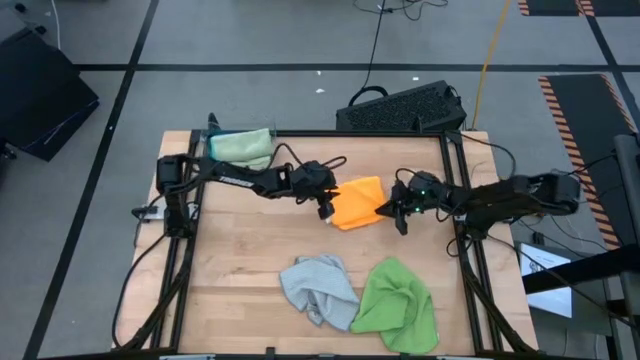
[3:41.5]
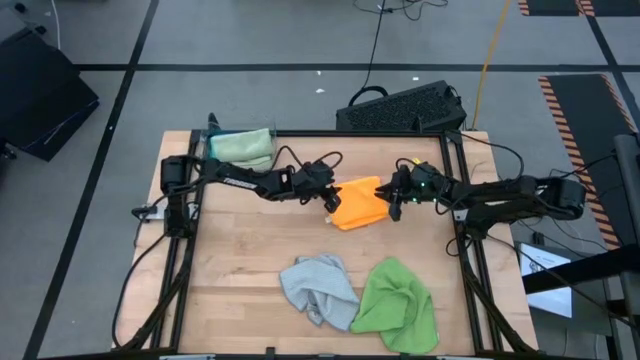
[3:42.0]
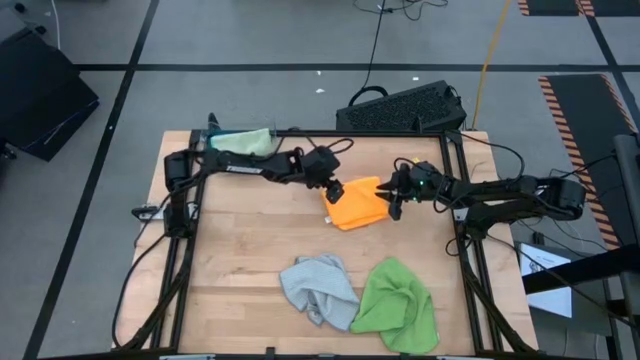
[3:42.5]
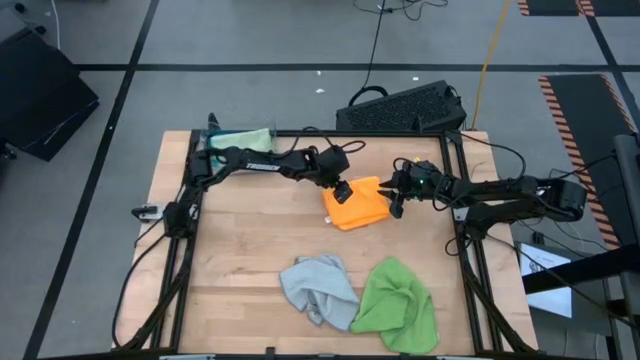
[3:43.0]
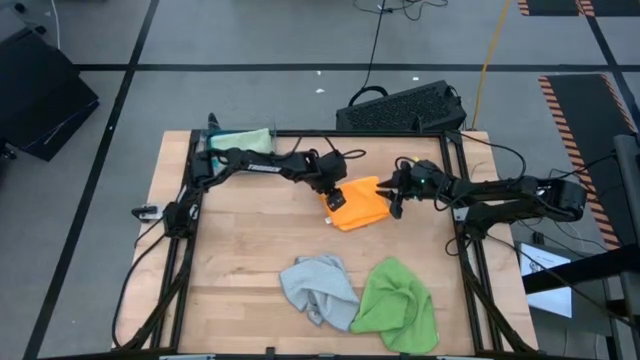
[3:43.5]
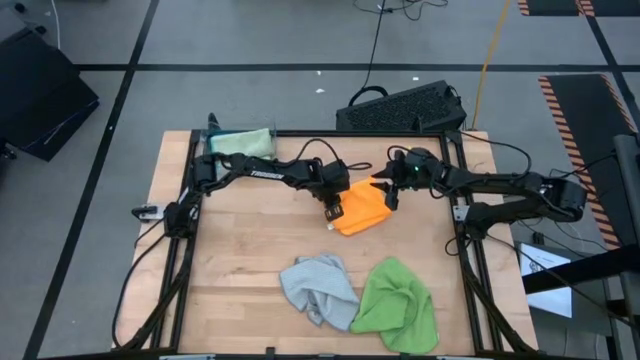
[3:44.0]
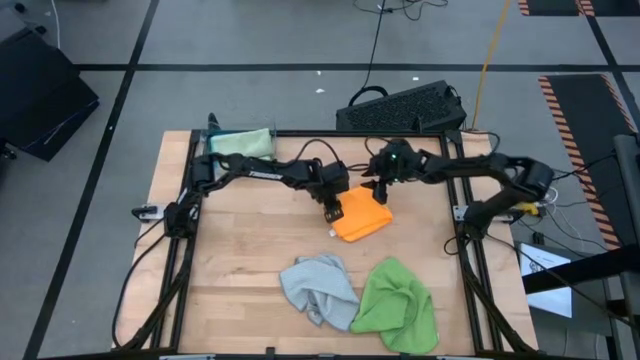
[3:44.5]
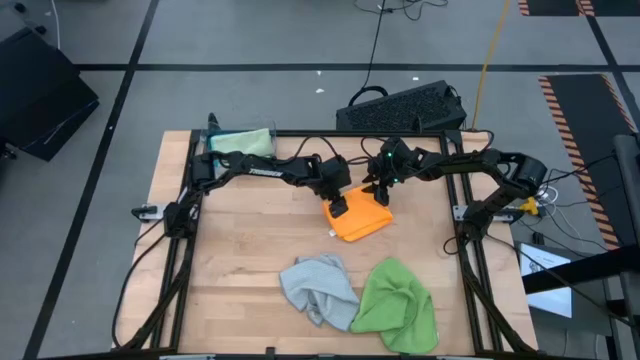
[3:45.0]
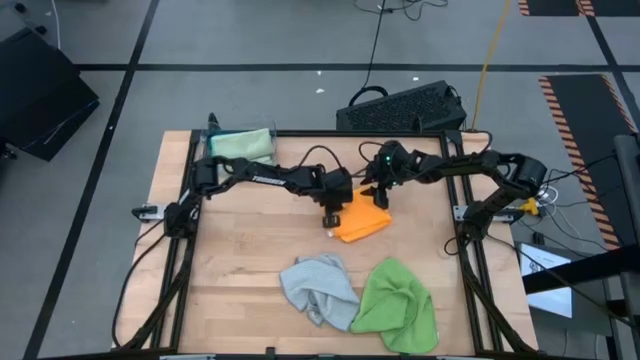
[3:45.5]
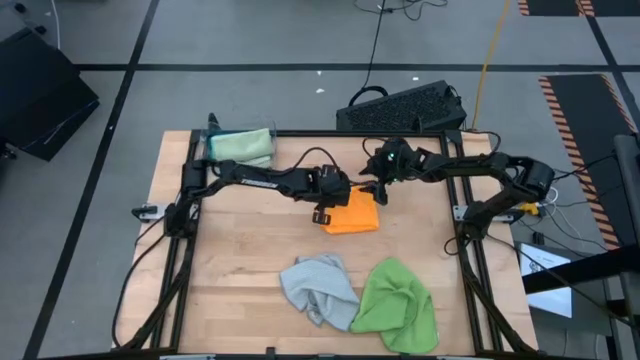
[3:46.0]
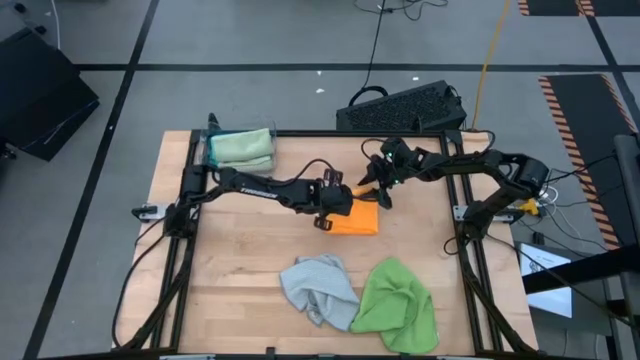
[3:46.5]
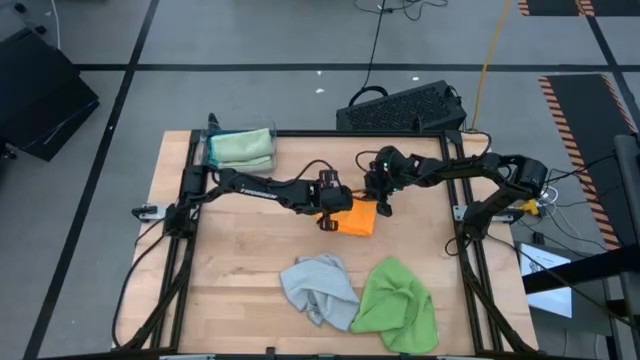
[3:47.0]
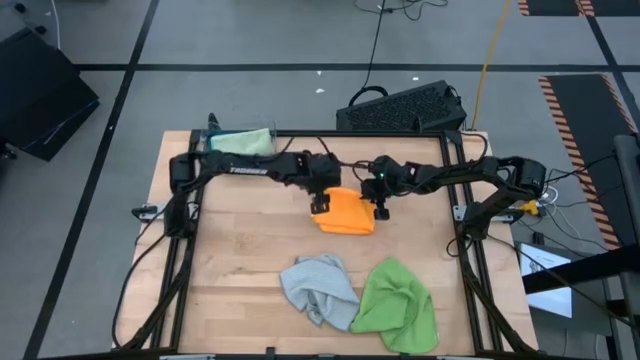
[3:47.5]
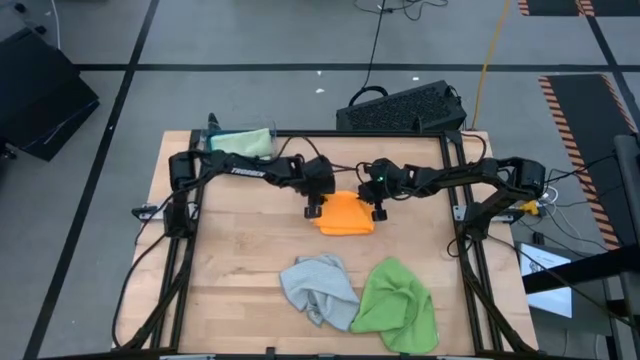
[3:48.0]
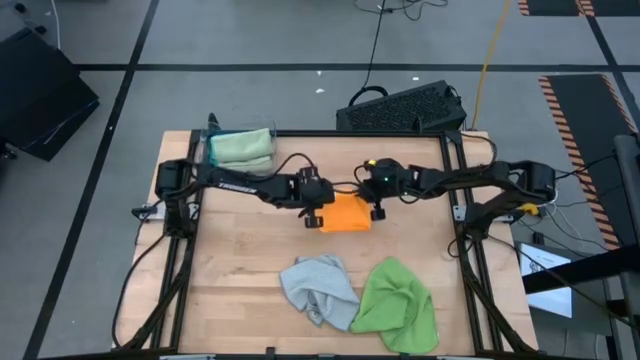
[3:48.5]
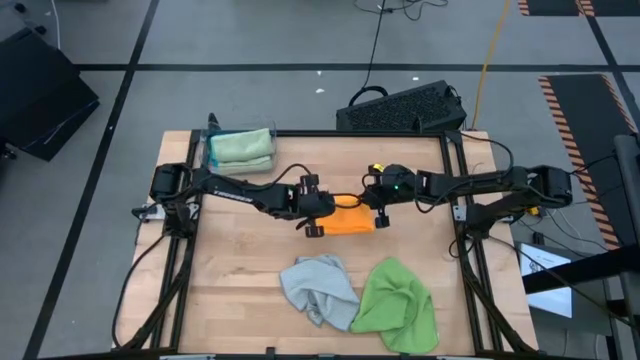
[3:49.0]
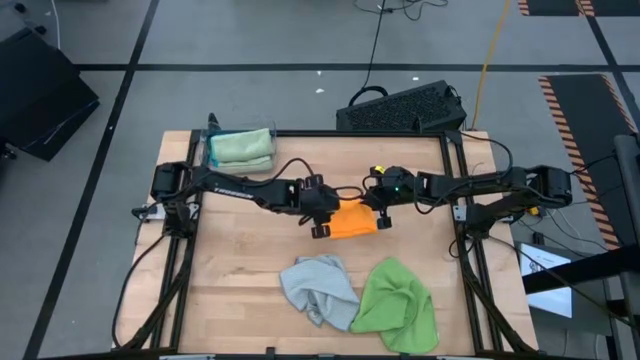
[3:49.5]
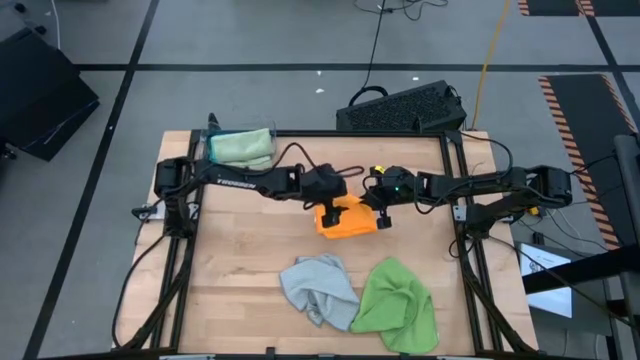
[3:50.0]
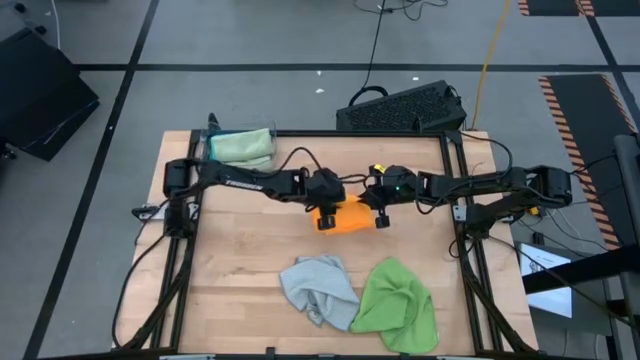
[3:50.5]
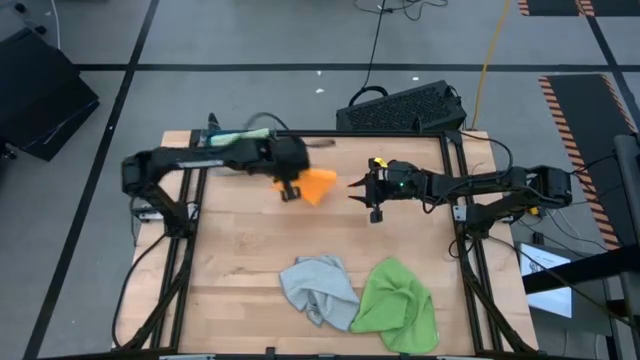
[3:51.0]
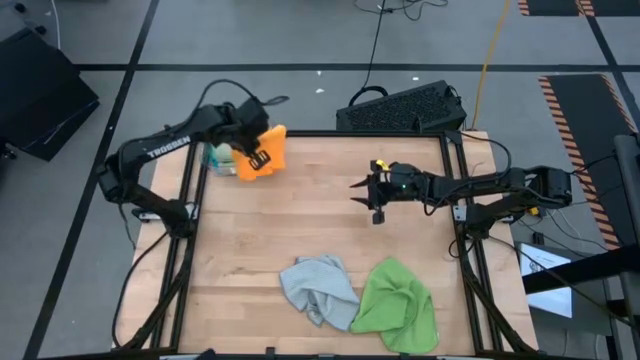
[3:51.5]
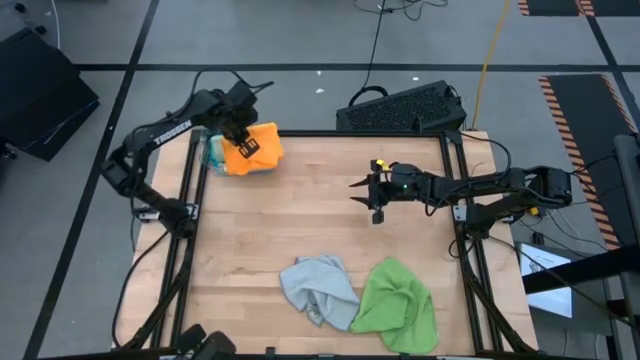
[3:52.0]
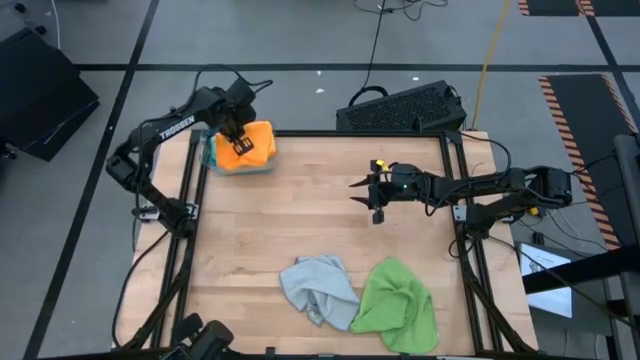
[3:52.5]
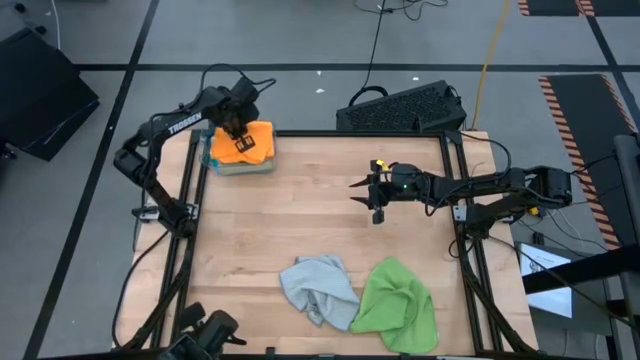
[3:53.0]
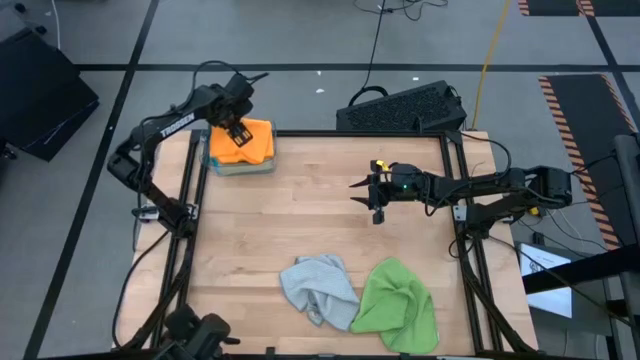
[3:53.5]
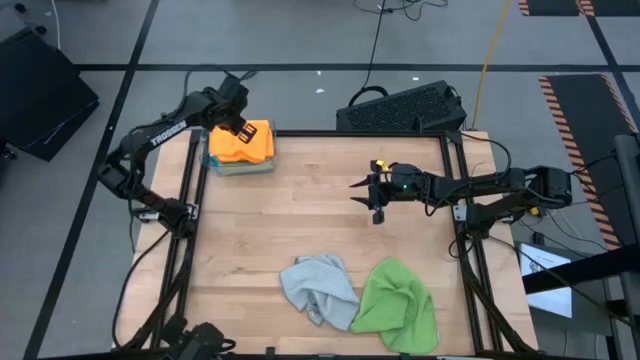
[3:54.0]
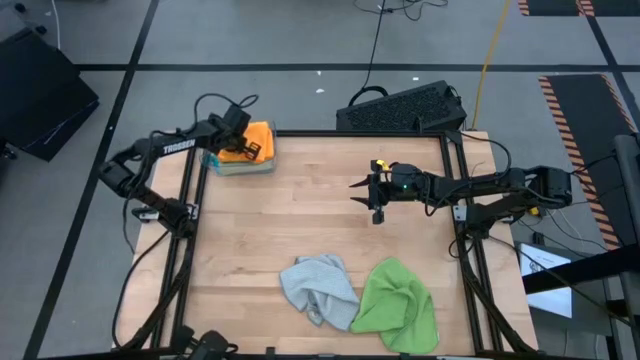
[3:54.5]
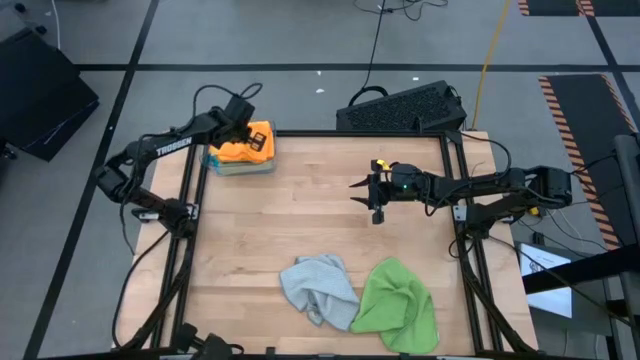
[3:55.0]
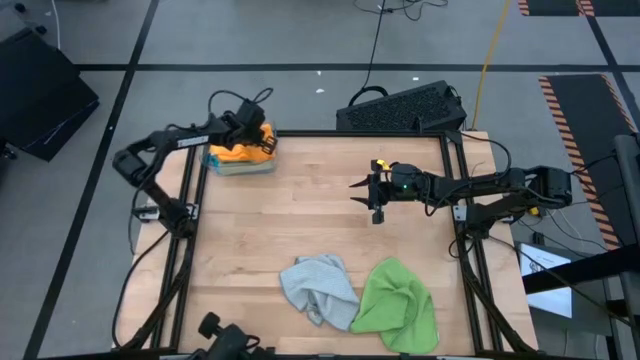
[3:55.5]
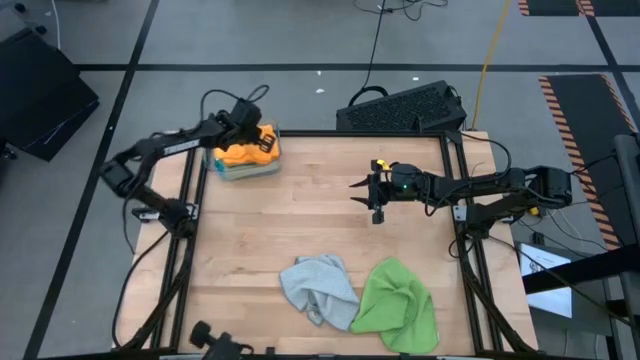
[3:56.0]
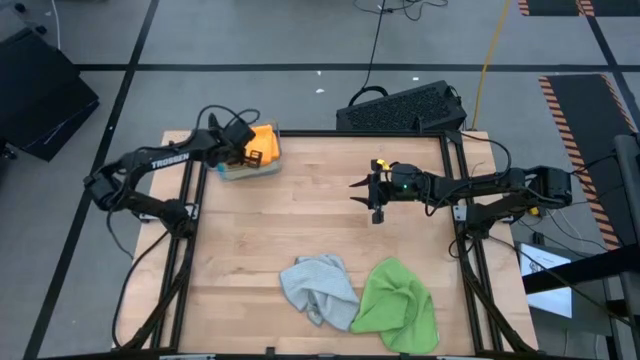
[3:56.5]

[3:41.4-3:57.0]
Task: Fold microfiber towels
Stack the orange microfiber cloth on top of the light green microfiber cloth

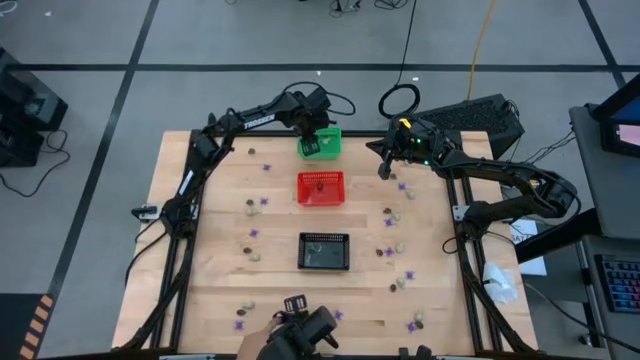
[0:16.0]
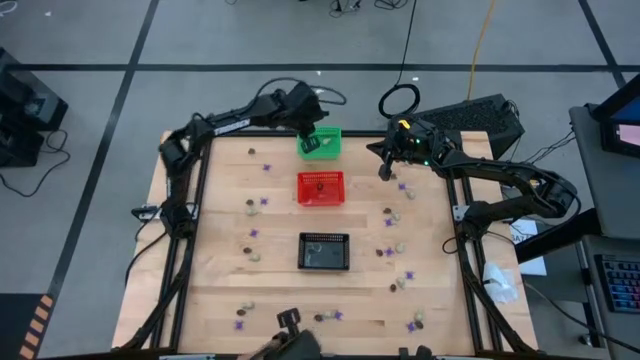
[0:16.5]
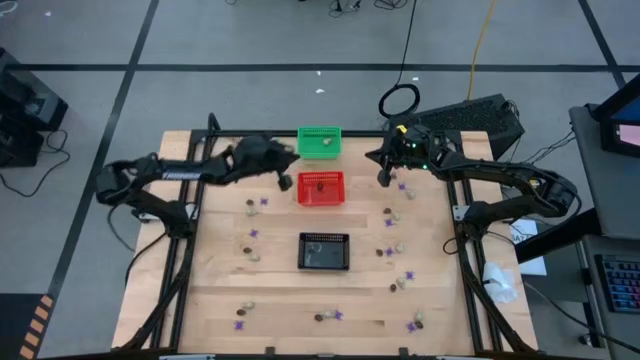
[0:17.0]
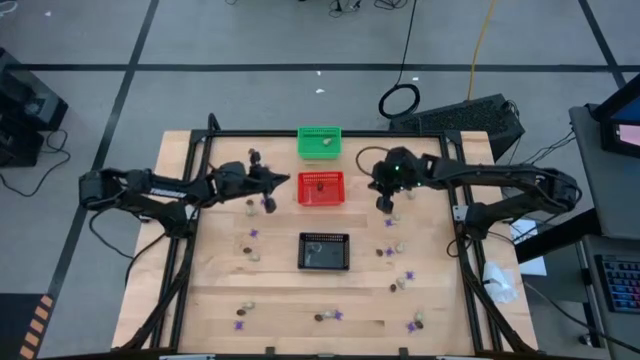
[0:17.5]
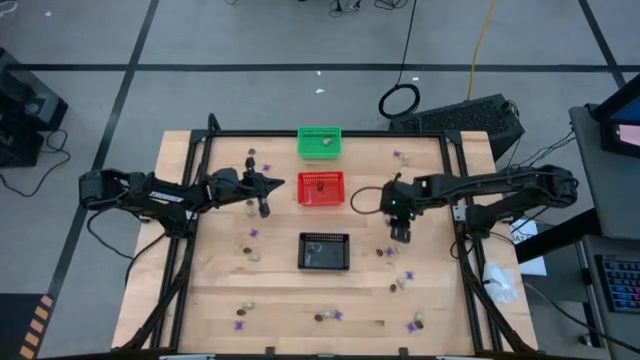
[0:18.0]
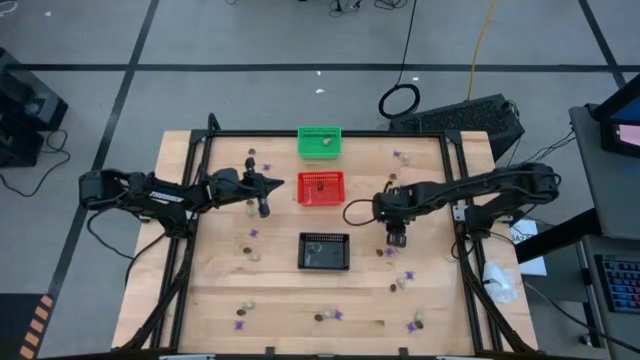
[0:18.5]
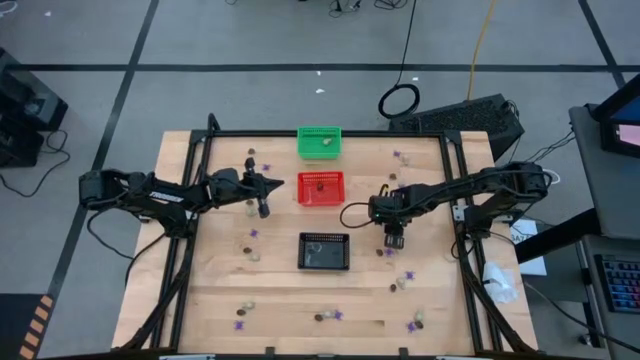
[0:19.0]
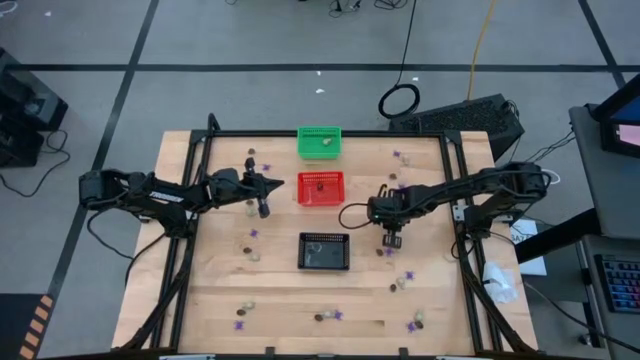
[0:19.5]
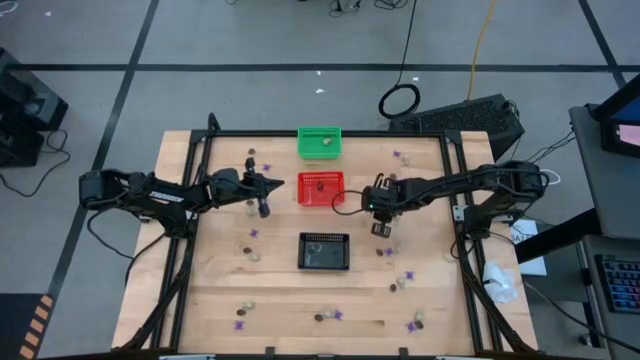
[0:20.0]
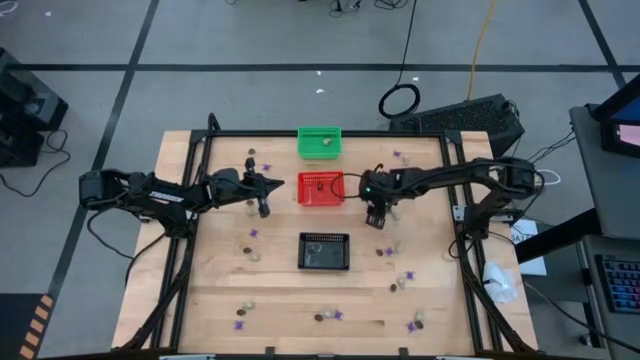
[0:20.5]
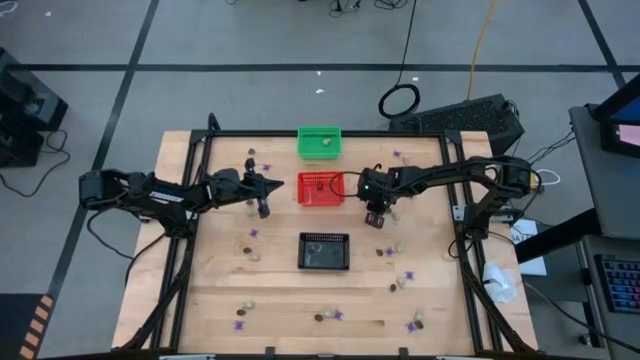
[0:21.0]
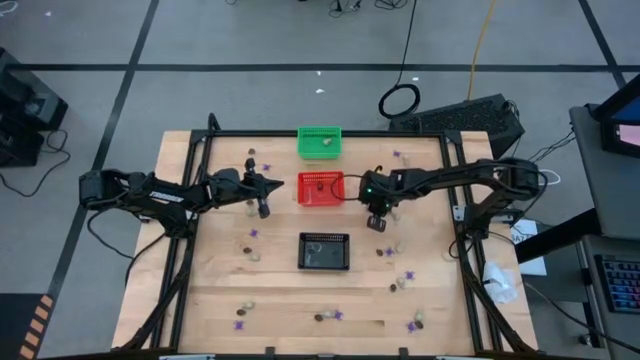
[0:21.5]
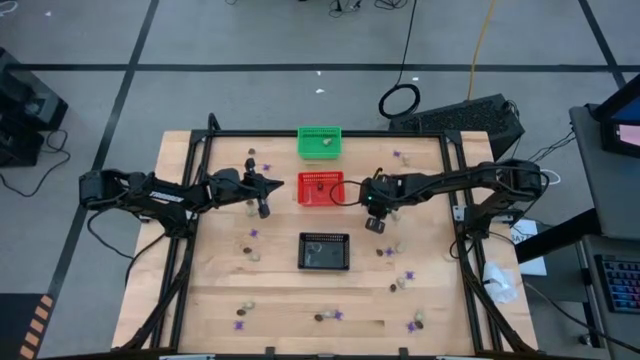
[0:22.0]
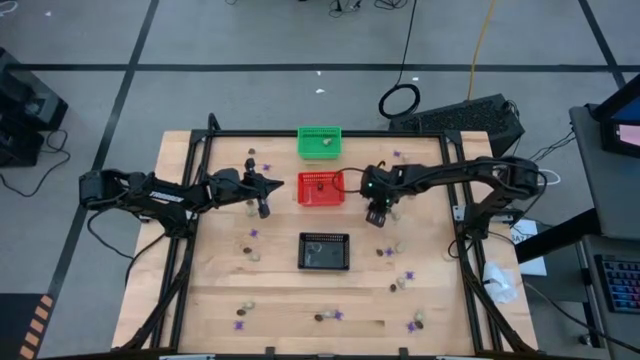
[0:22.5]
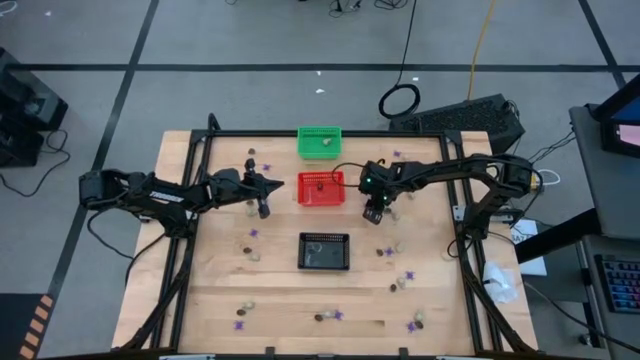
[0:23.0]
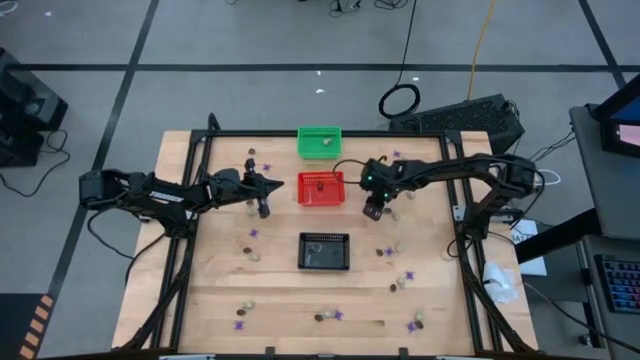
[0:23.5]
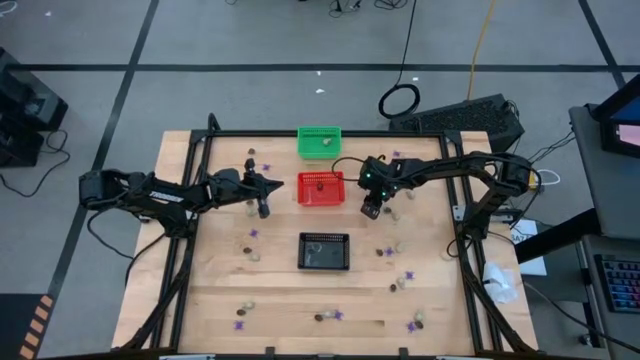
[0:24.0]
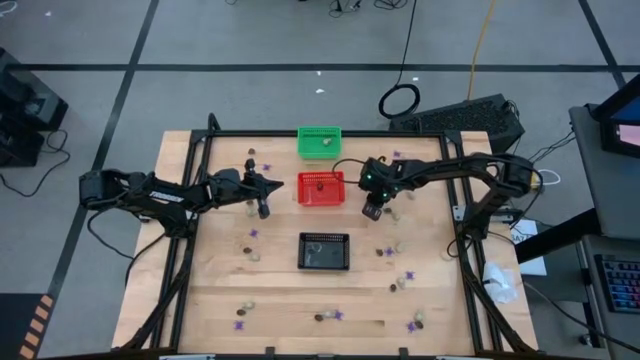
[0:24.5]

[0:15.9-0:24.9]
Task: Sort Halloween decoration
Put the violet spider toy into the black basket
